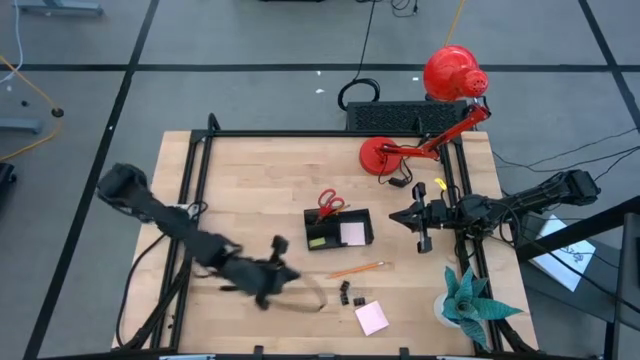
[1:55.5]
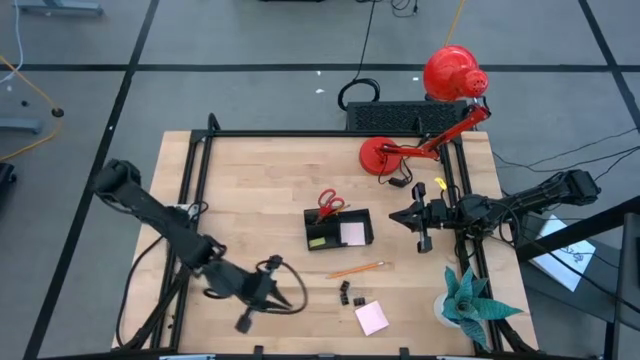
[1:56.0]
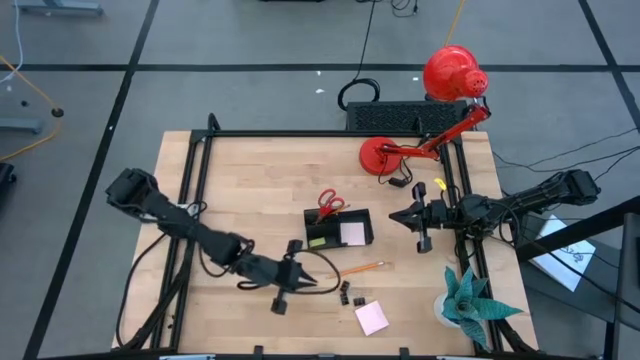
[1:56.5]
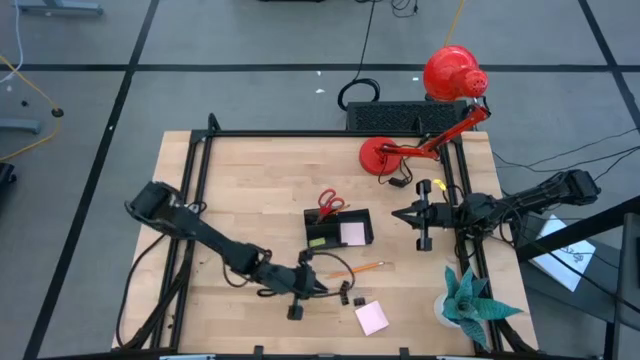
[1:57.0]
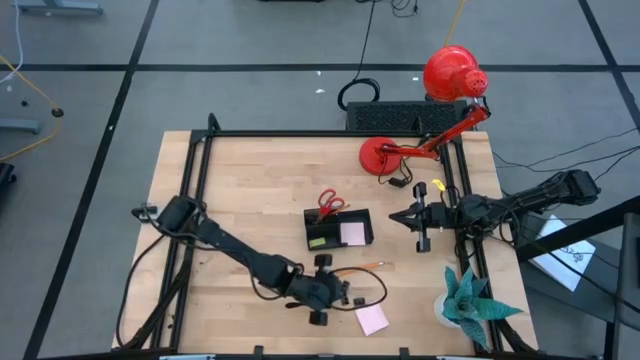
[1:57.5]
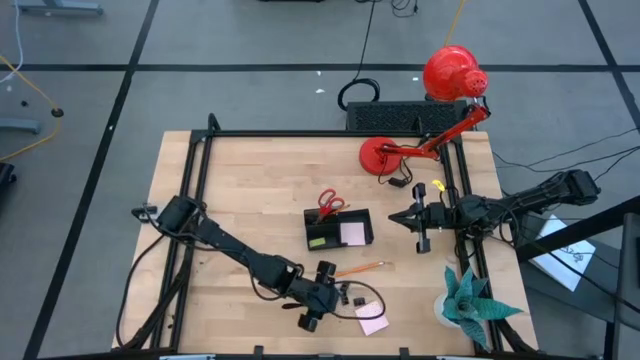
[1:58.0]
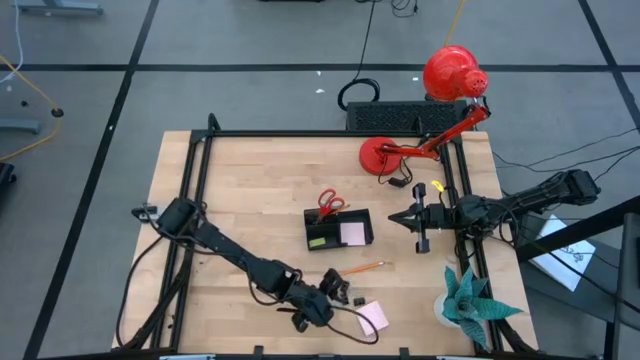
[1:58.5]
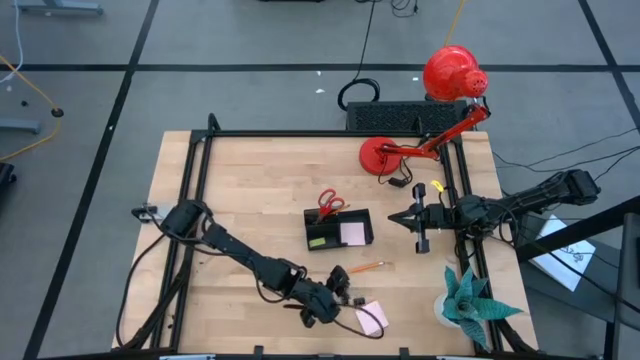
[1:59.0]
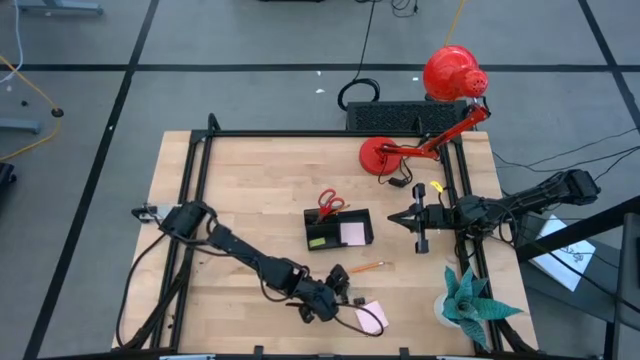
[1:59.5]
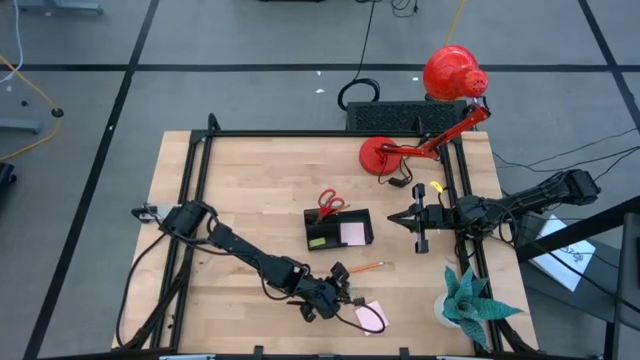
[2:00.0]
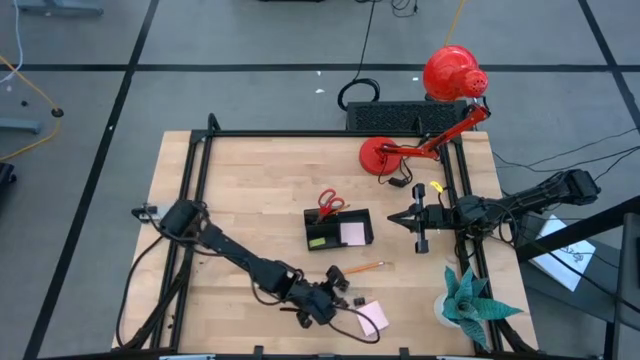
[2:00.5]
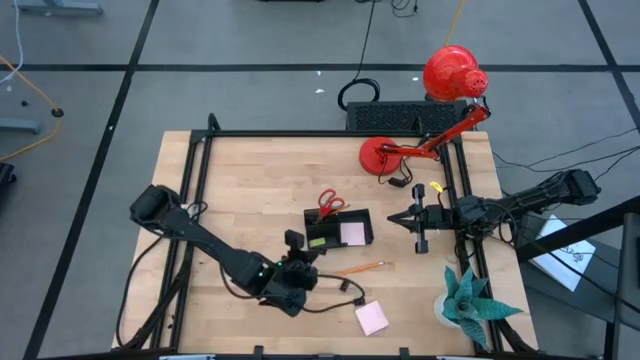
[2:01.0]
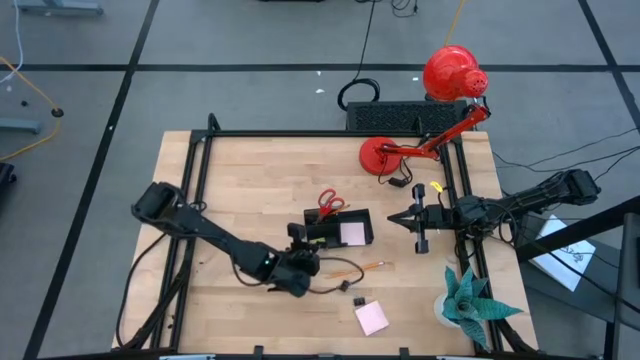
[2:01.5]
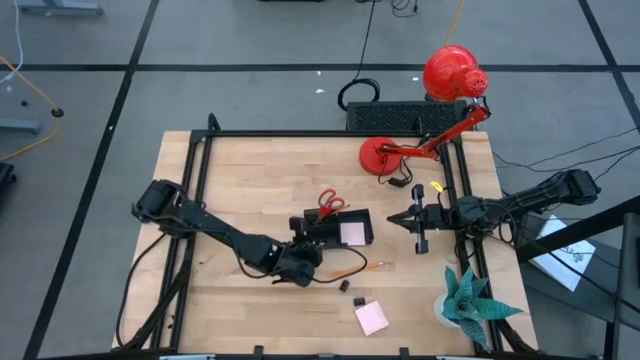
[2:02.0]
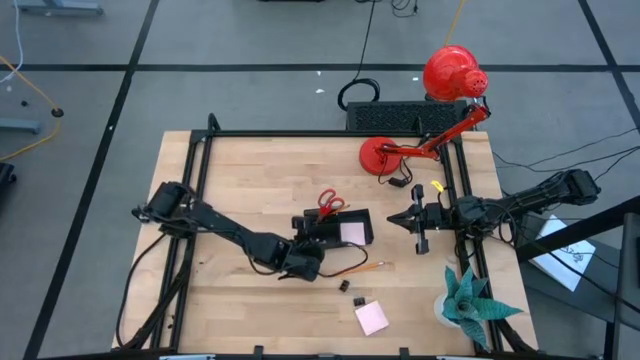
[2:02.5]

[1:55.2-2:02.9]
Task: Pick and place office supplies into organizer
Put the bottom left binder clip into the bottom left compartment of the desk organizer

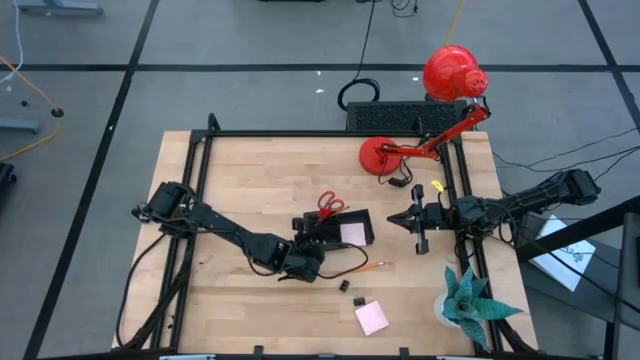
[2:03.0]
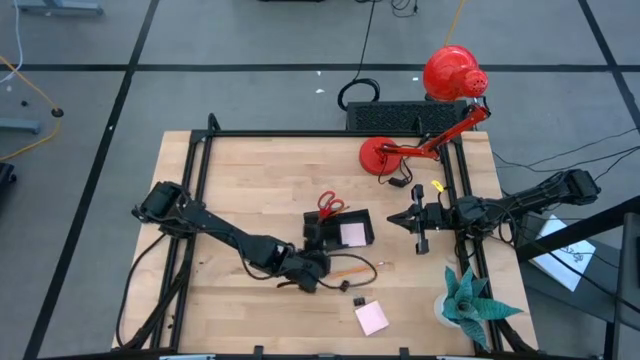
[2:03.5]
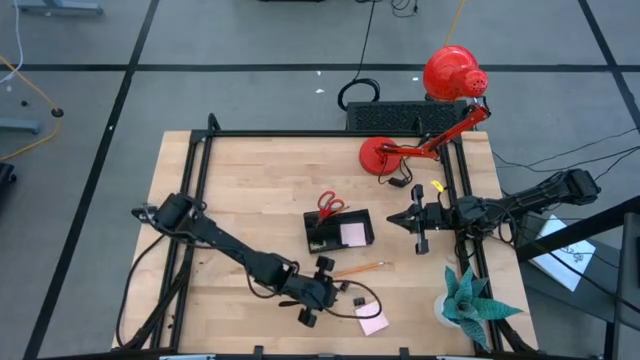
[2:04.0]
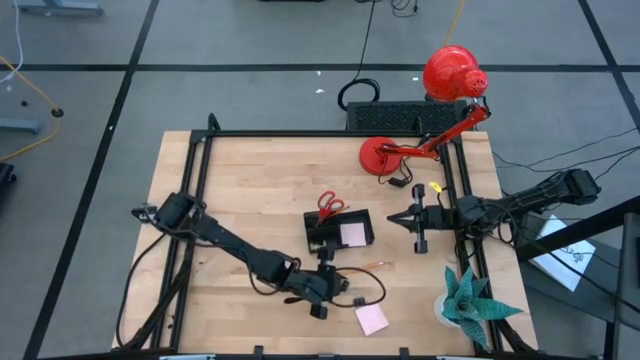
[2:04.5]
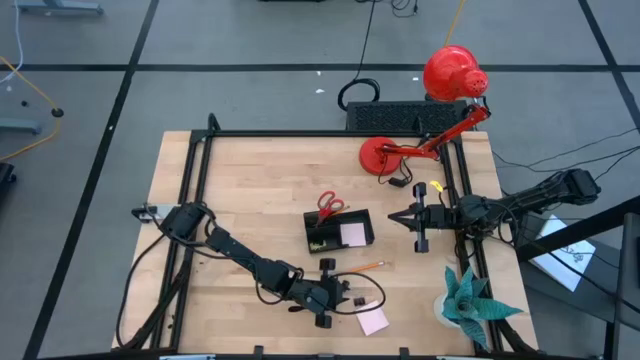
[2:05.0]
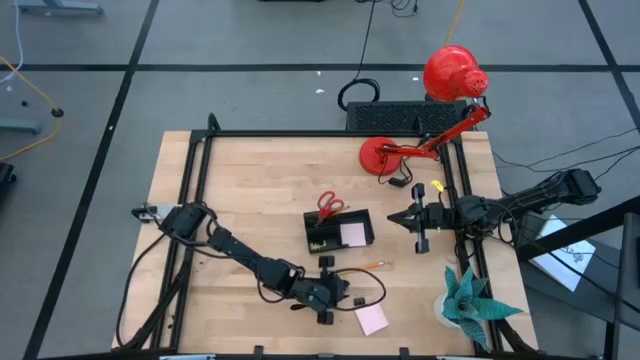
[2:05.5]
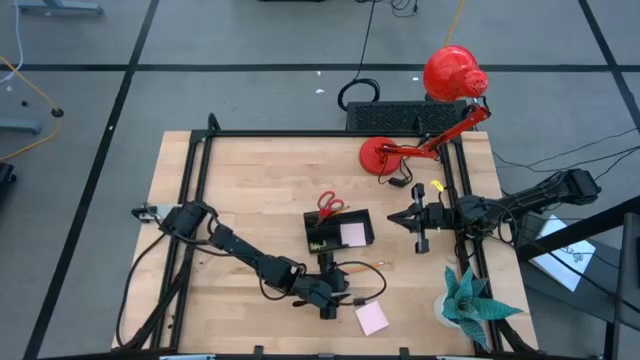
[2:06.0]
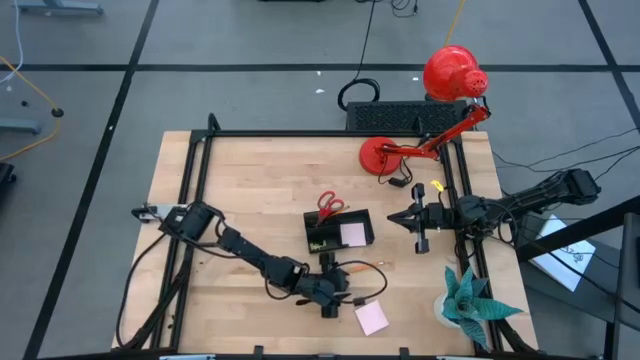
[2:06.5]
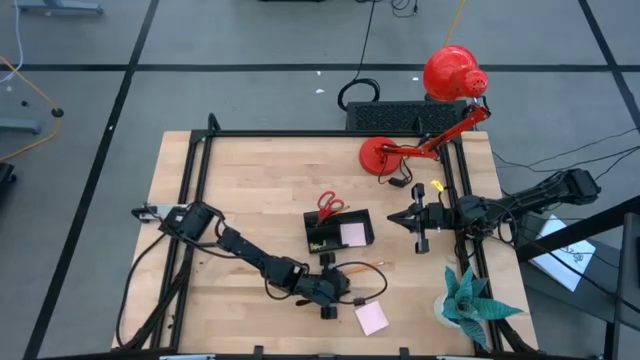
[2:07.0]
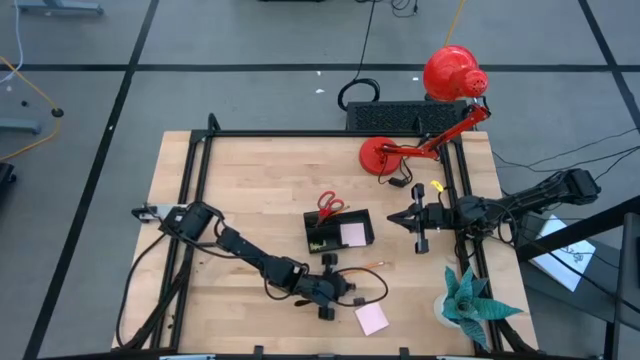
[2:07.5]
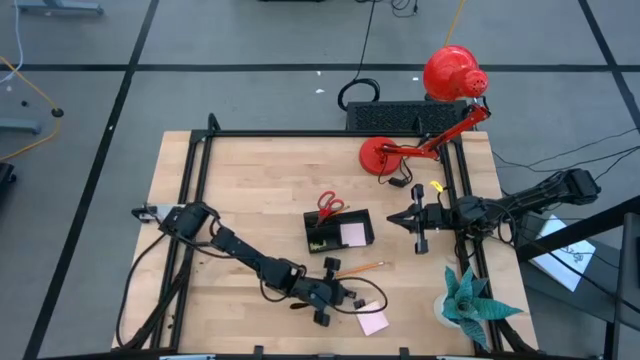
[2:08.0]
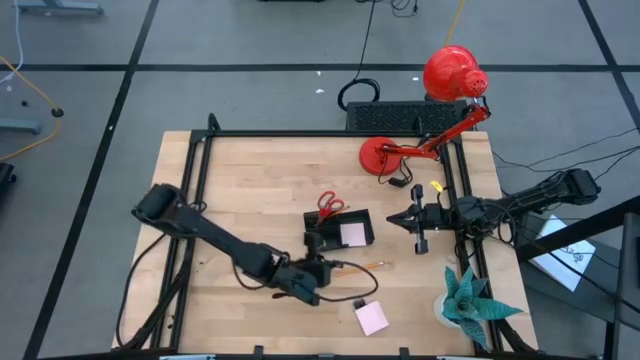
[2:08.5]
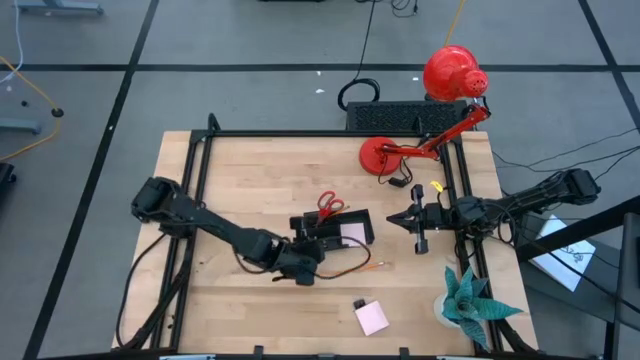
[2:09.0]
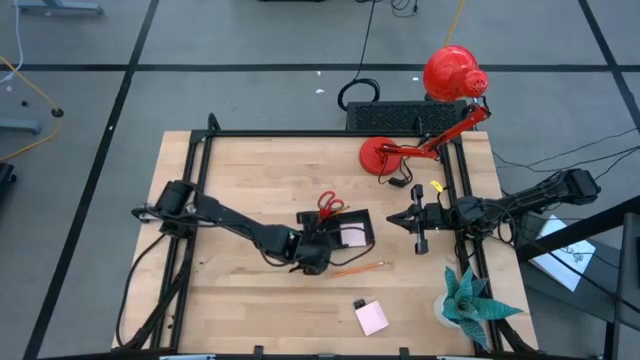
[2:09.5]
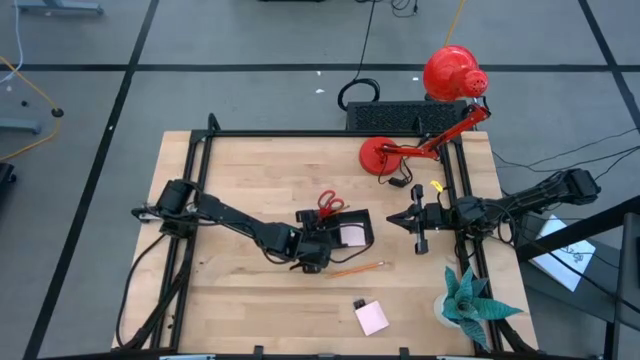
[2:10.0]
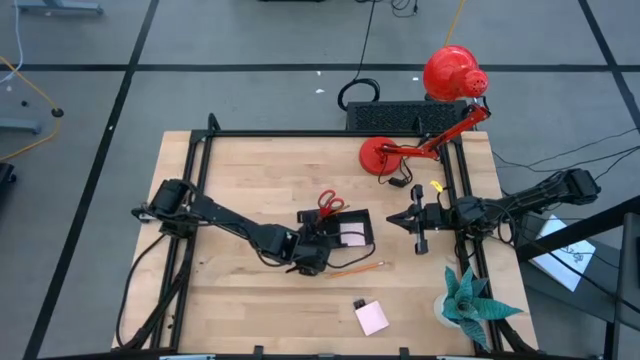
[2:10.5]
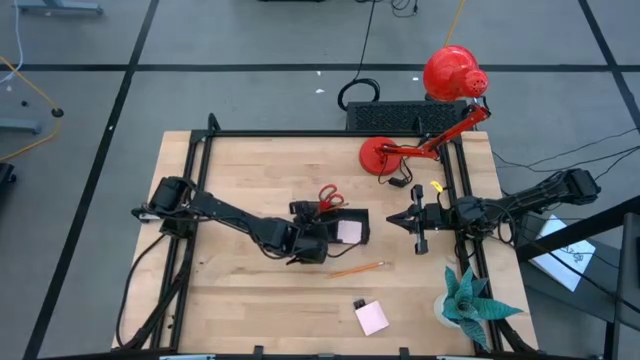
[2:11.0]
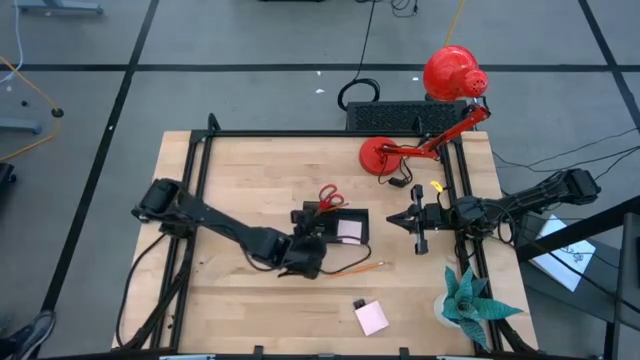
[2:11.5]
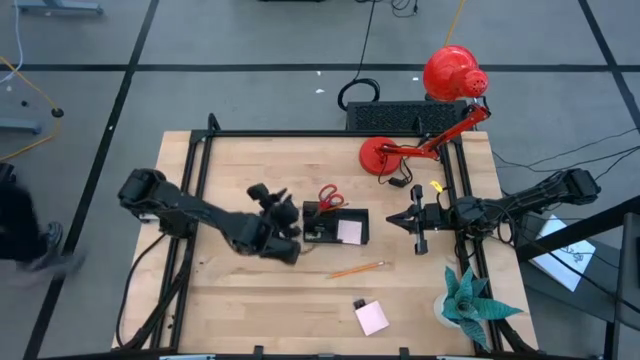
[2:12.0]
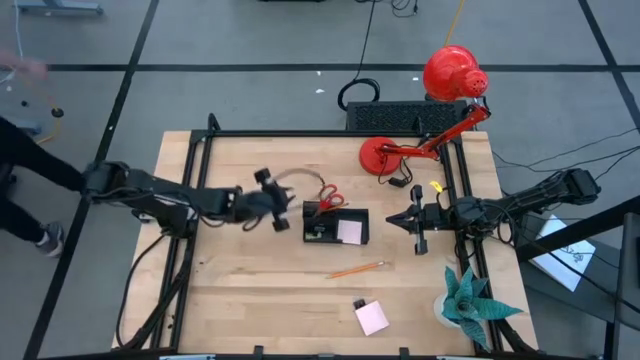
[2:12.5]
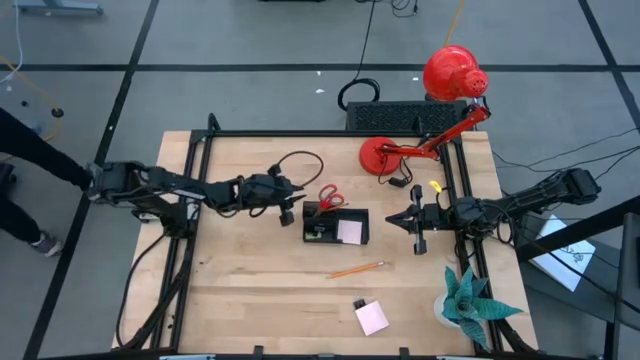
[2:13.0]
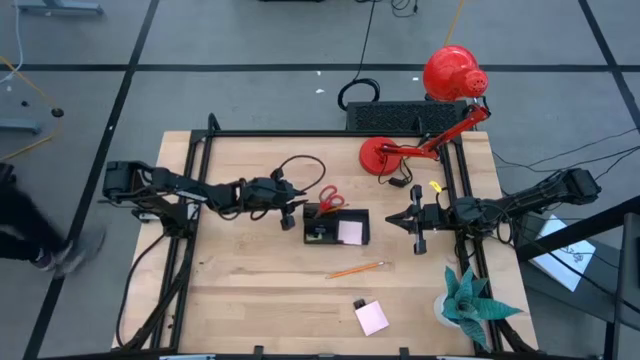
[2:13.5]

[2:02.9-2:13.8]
Put the top binder clip into the bottom left compartment of the desk organizer

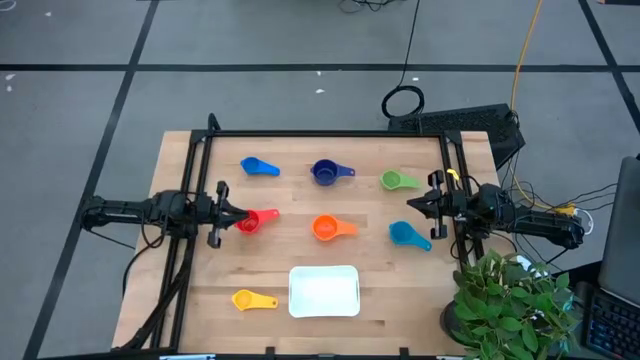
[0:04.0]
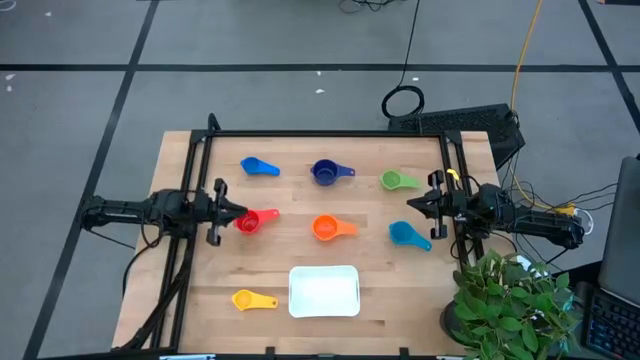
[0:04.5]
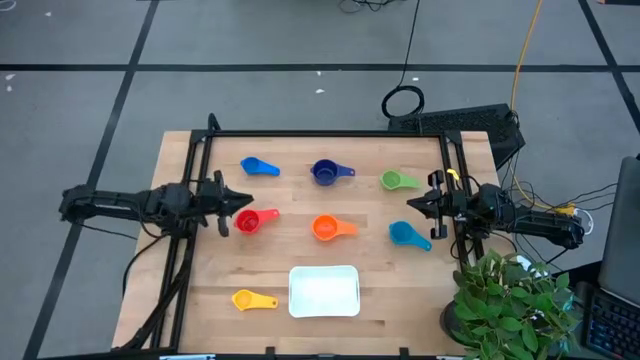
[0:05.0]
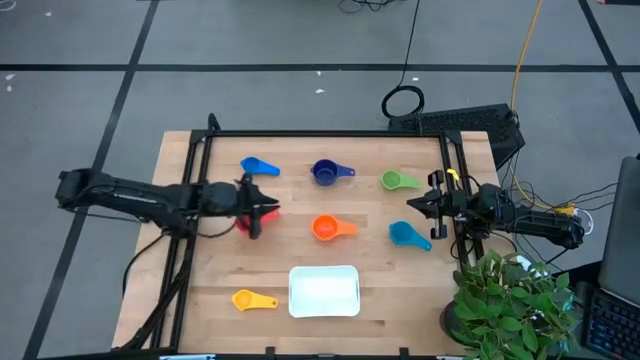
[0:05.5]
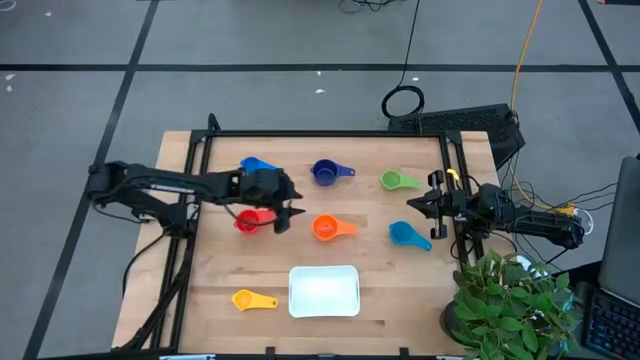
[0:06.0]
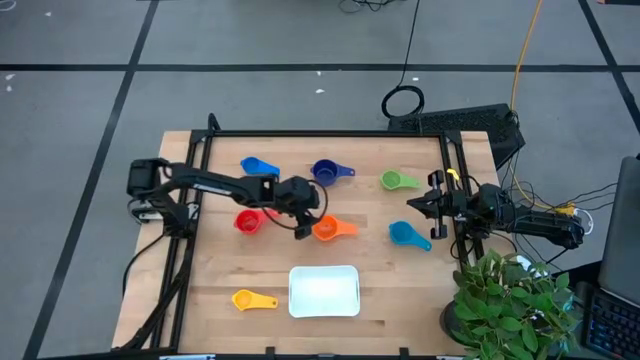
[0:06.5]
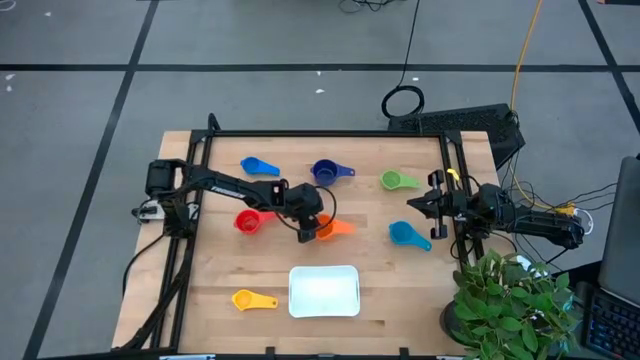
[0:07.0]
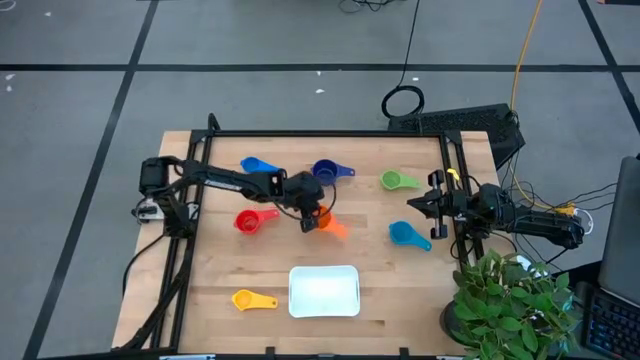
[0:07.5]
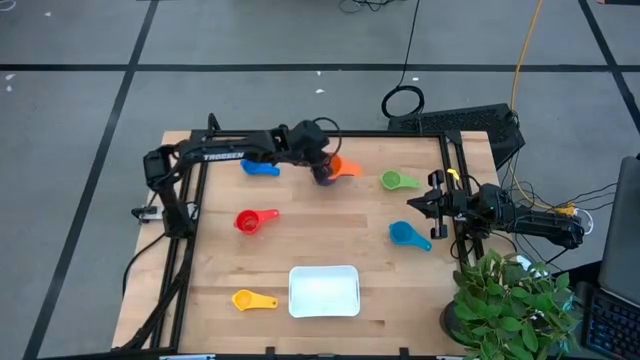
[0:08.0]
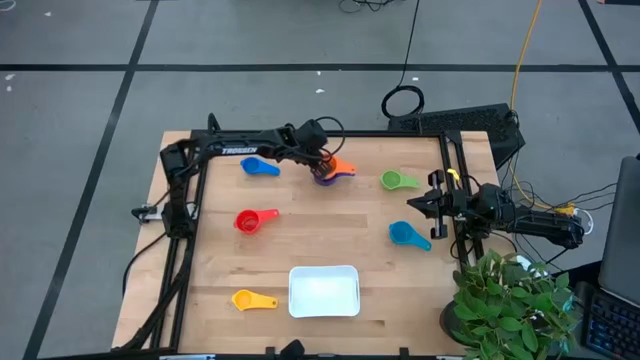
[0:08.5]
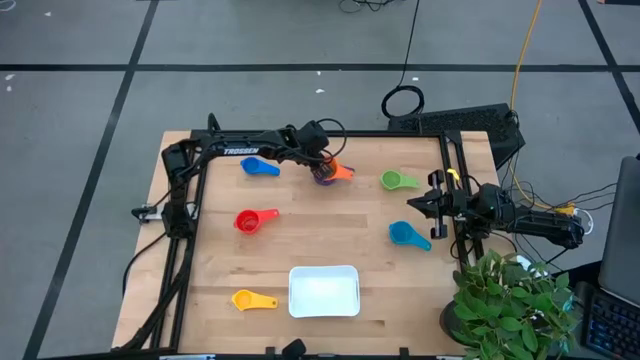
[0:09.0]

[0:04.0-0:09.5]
Task: Nest measuring cups in basket
Stack the orange measuring cup on the purple measuring cup
